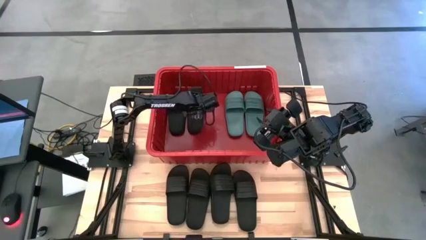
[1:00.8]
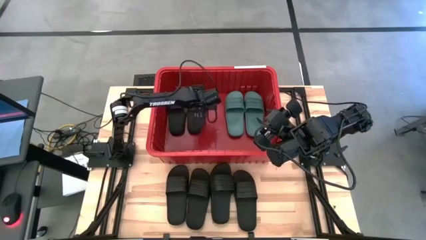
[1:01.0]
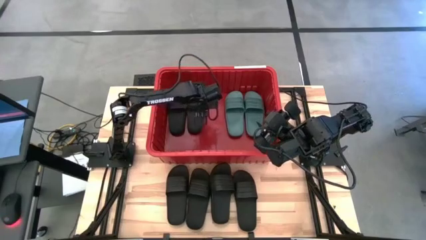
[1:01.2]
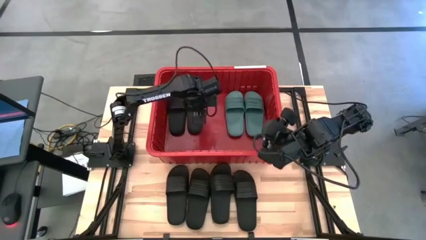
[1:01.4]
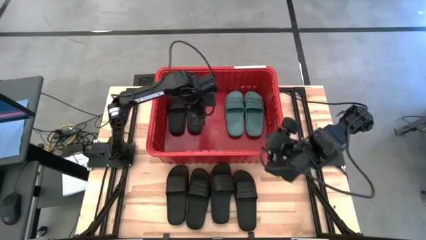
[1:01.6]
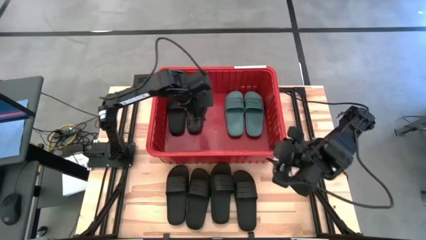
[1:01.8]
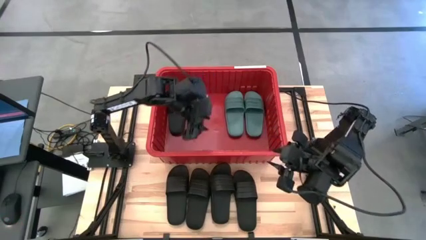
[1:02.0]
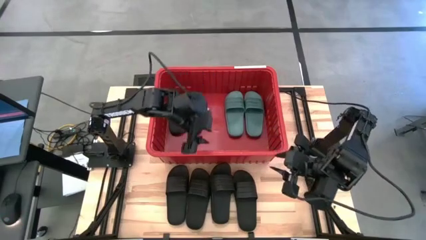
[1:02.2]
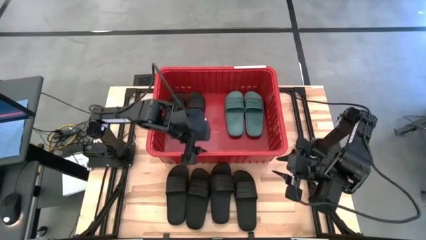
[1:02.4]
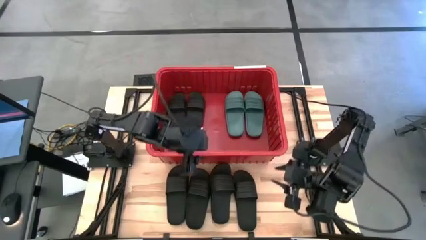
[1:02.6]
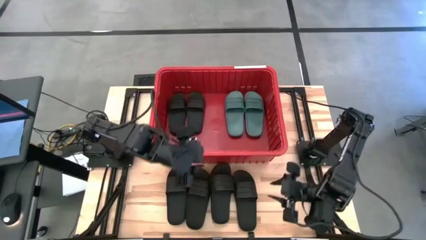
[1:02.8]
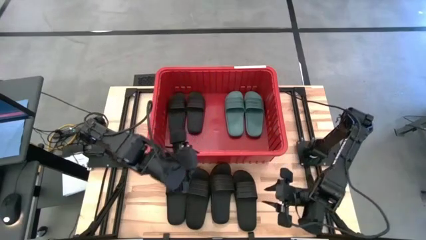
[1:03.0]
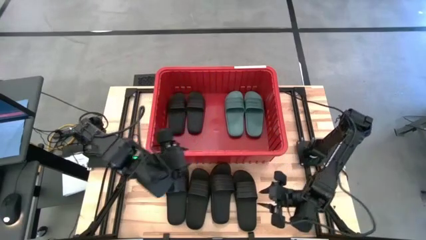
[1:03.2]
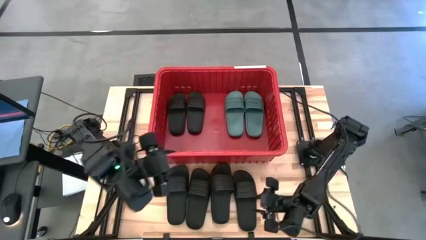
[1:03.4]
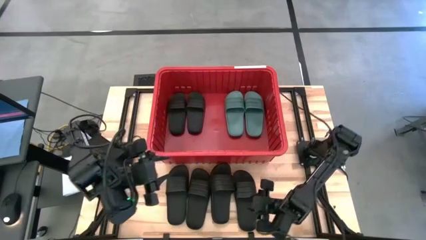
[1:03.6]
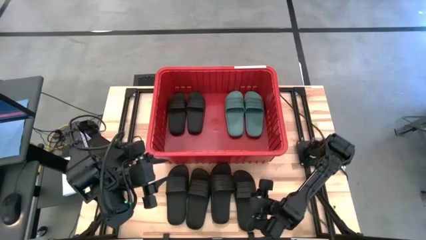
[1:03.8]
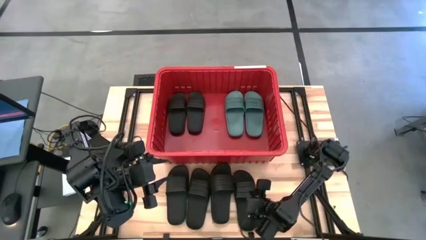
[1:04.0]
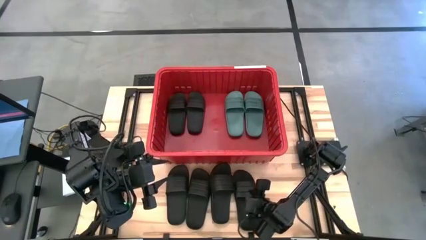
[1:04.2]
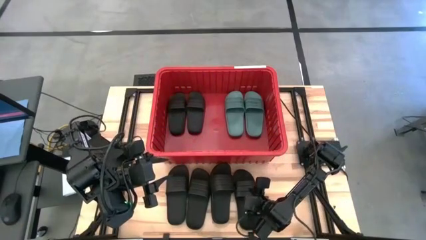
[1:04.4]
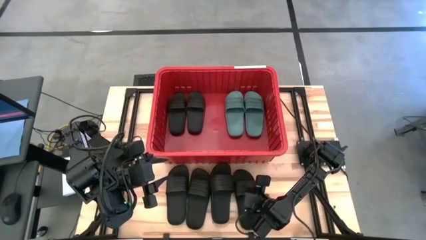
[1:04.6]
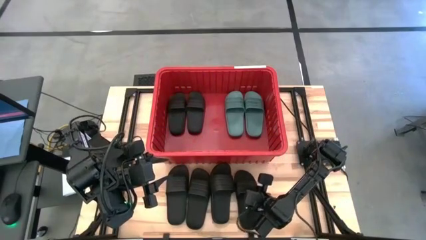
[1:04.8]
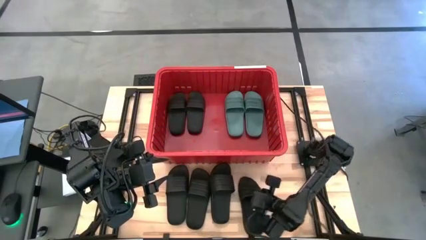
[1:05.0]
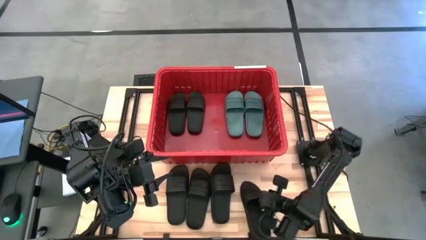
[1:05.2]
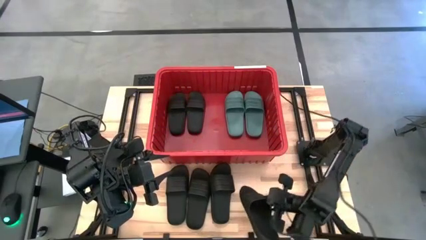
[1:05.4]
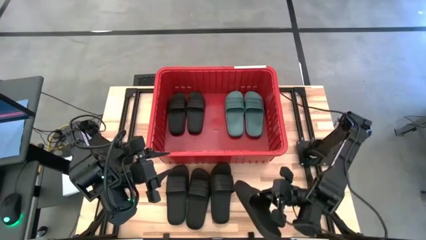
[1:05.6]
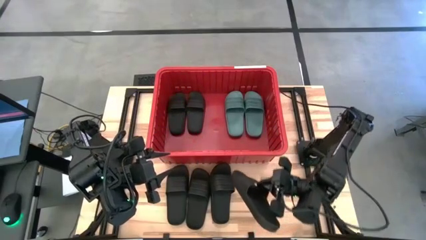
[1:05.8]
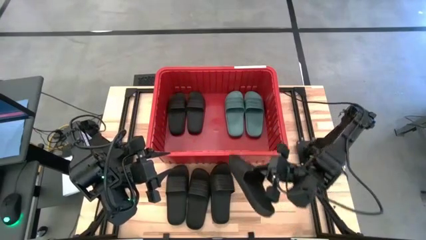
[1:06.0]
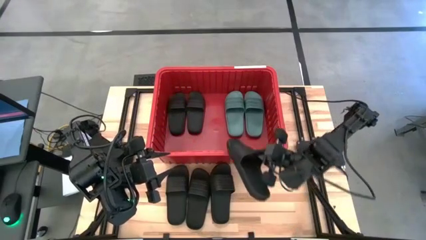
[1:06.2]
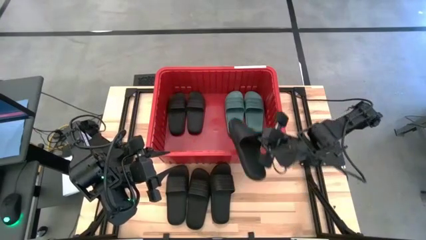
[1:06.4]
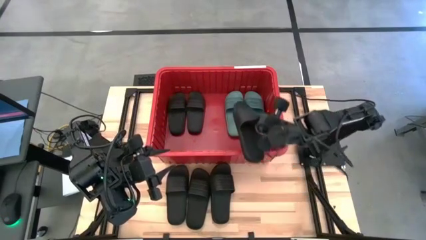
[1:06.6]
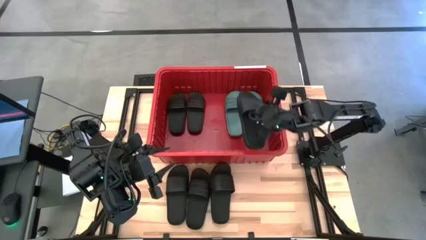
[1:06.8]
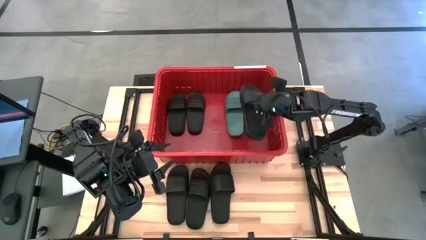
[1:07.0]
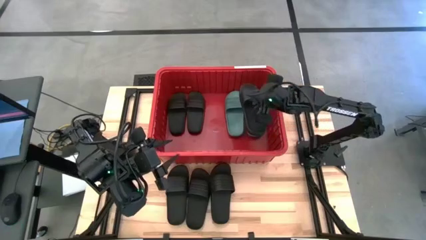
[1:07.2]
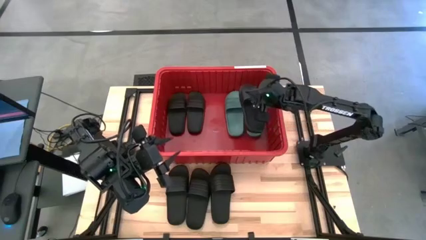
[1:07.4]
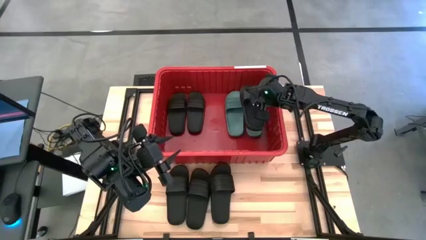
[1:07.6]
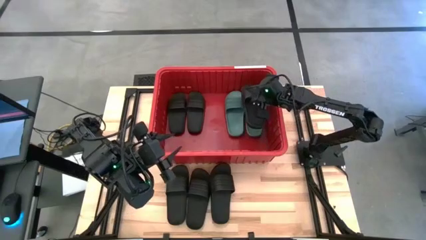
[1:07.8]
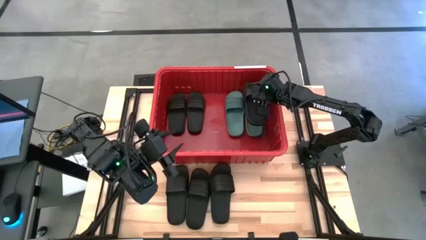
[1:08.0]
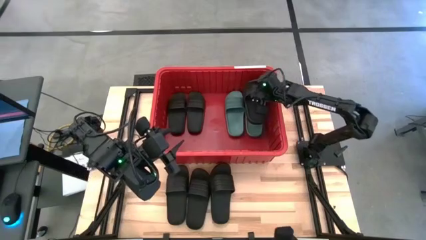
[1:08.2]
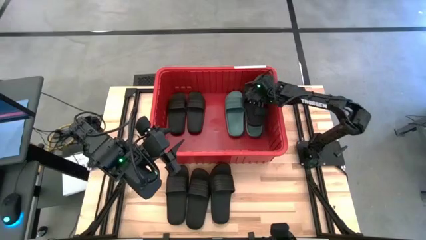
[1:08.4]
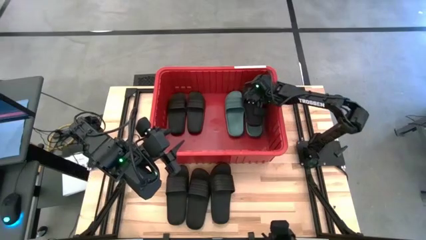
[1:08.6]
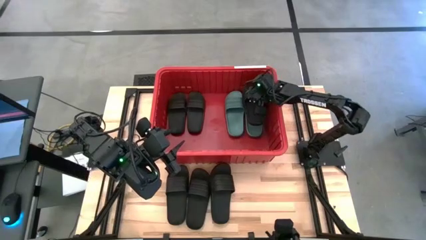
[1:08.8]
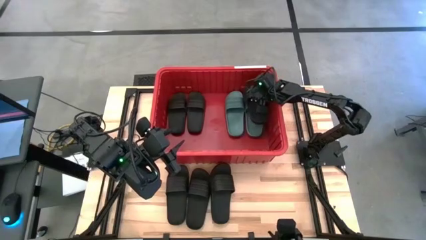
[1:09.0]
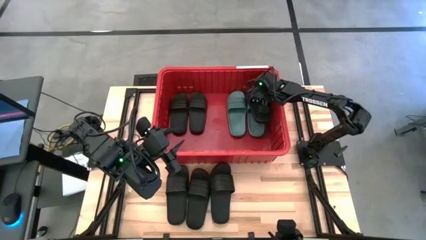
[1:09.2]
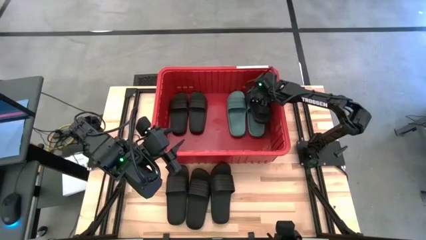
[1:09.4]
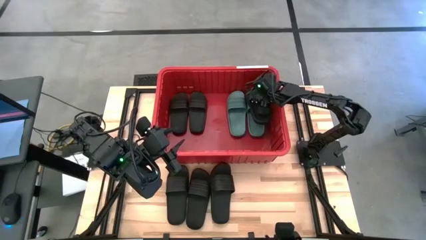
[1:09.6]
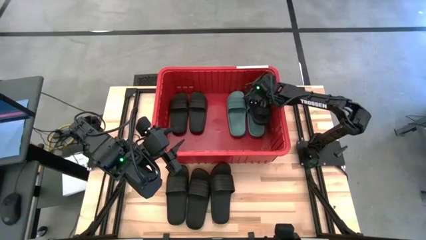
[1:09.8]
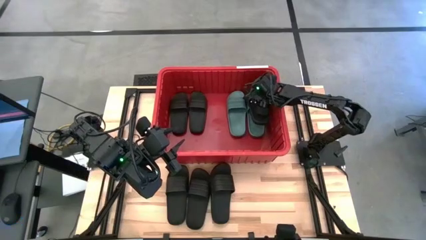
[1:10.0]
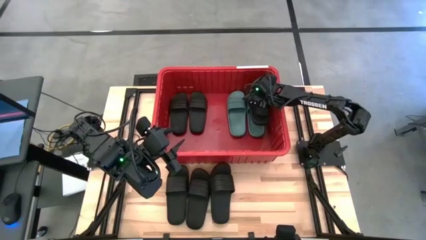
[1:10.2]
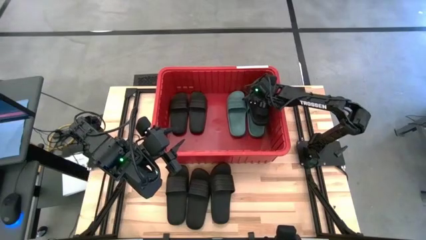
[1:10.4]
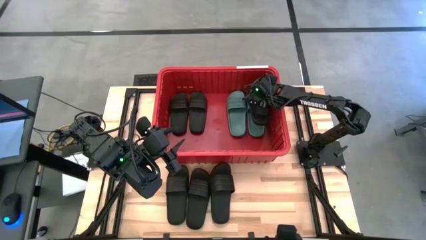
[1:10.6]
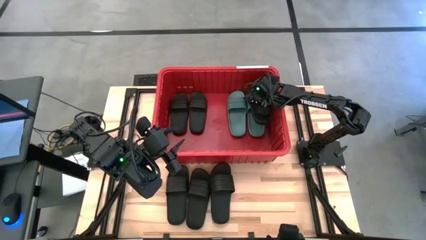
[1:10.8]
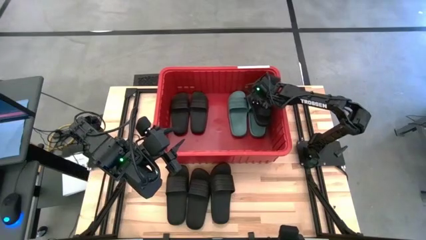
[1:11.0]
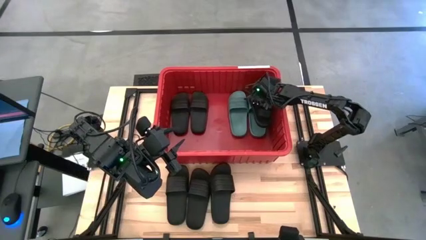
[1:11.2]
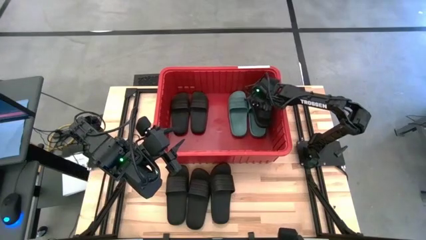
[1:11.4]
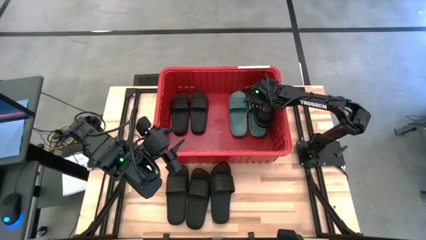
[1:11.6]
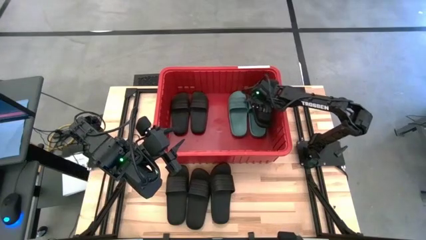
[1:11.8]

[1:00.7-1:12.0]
Task: Pick and place slides into bin
Put the black slipper into the red organizer bin

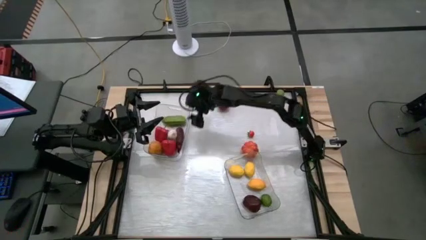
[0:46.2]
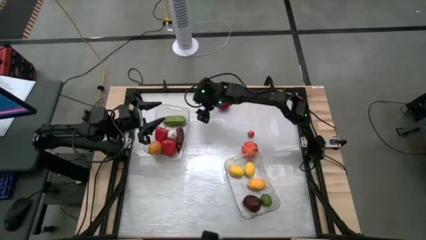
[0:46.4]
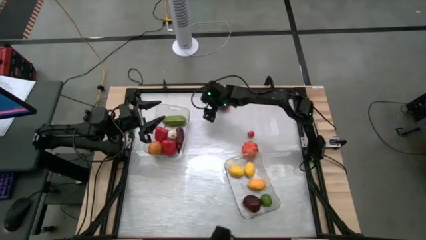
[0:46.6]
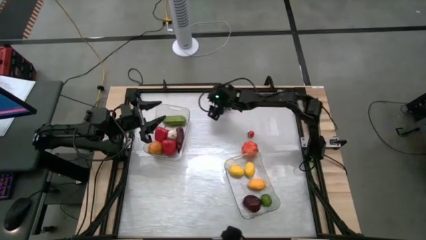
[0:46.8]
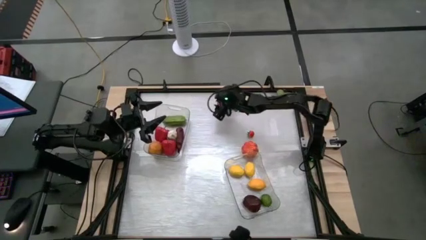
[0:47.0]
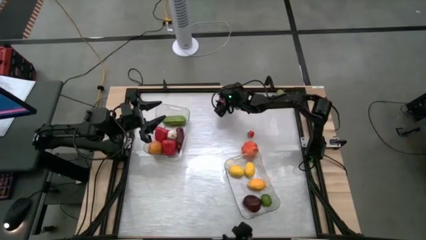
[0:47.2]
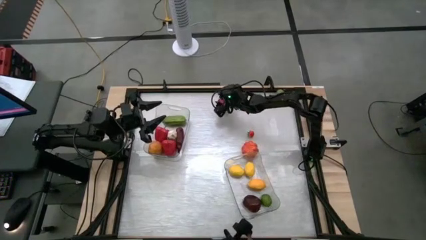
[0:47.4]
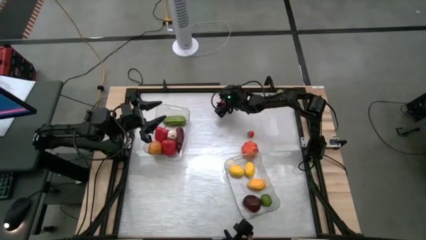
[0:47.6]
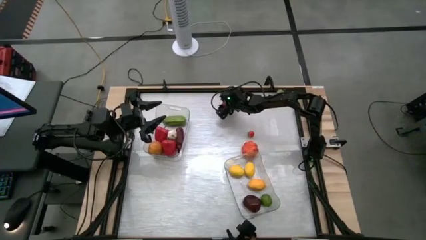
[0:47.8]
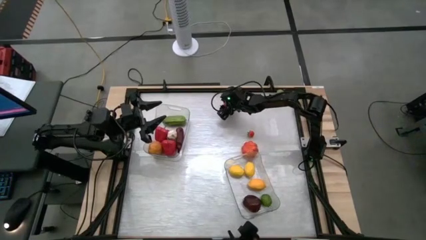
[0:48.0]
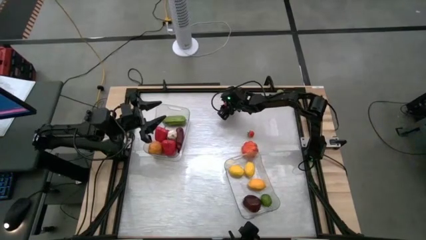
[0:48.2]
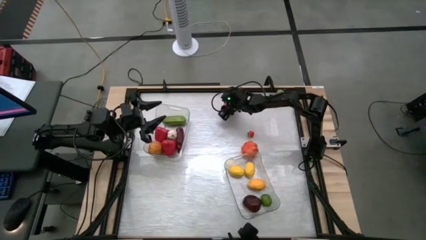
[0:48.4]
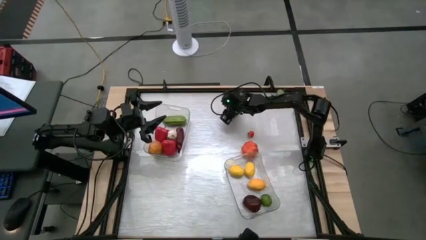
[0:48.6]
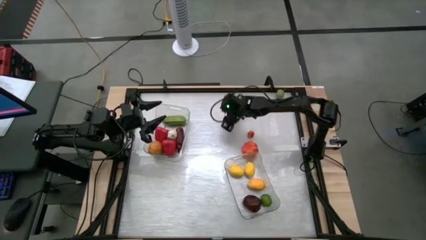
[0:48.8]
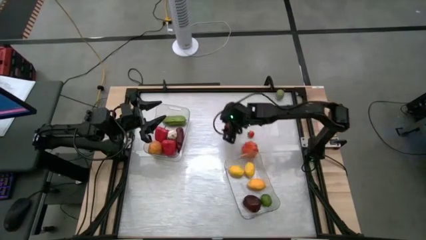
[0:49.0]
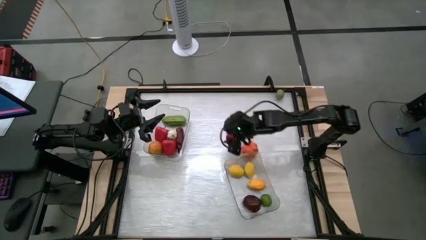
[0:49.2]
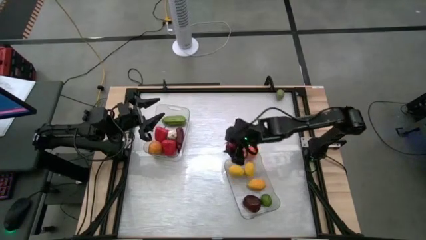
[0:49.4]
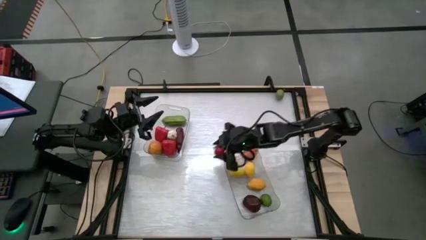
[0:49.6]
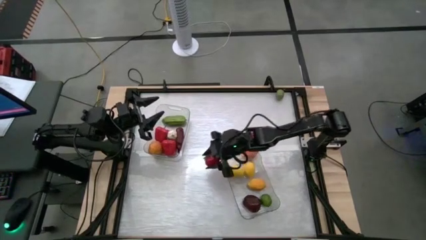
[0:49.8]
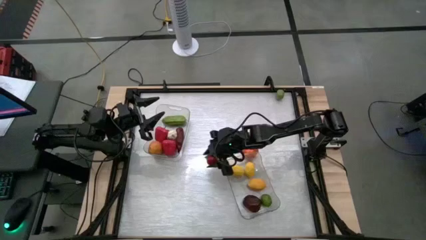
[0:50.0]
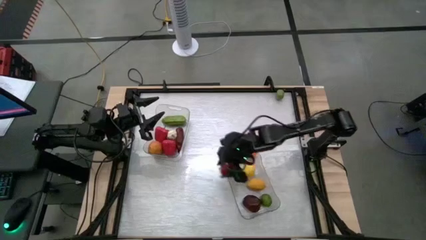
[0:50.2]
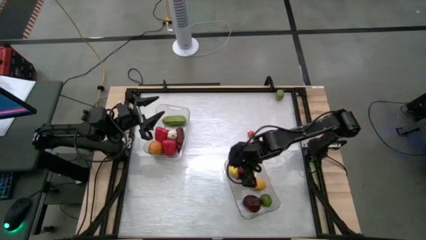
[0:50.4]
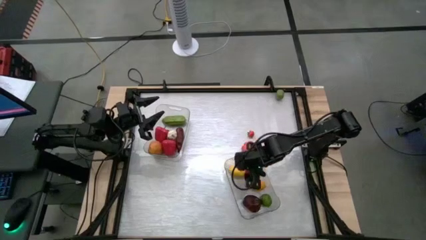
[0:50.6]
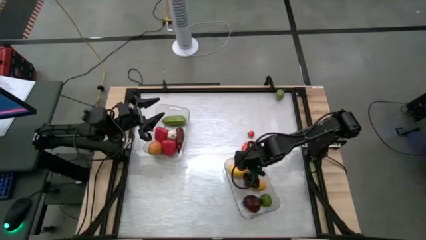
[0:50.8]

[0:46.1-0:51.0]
Task: Sort produce into baskets
Put the red tomato into the right transparent bin

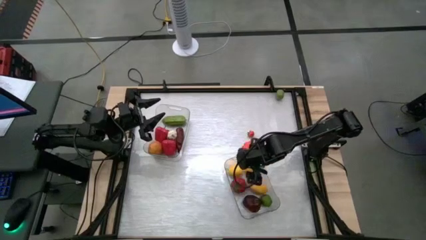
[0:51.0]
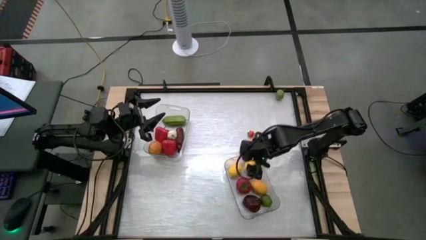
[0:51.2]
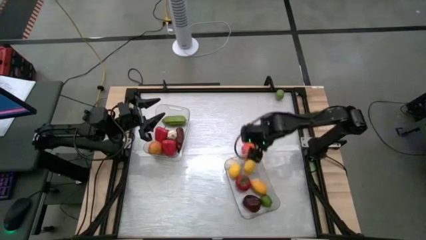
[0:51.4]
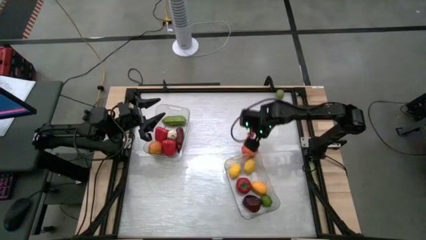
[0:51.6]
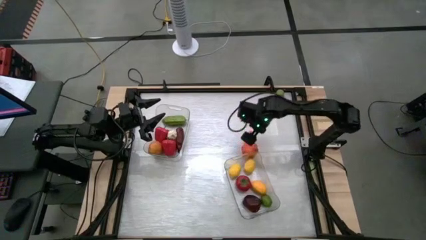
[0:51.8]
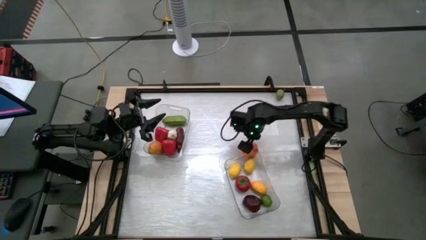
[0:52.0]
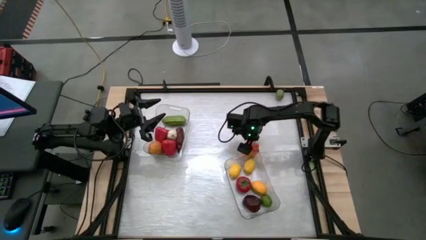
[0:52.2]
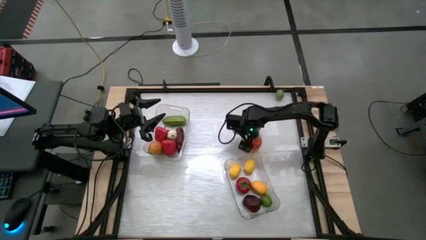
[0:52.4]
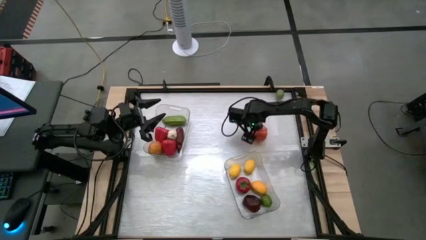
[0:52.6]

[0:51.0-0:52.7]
Put the orange squash into the left transparent bin
